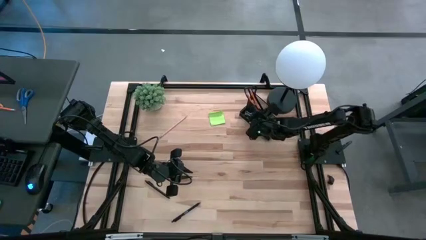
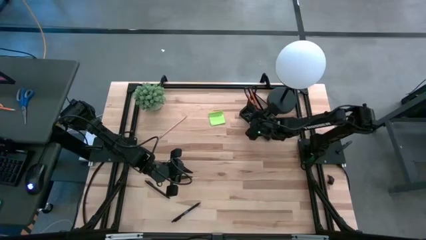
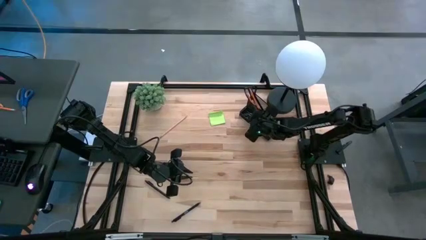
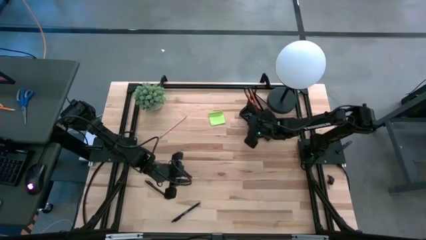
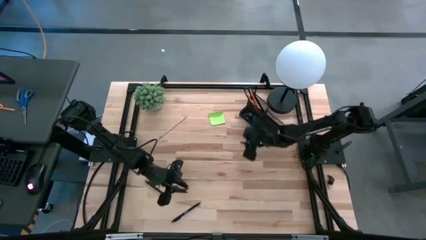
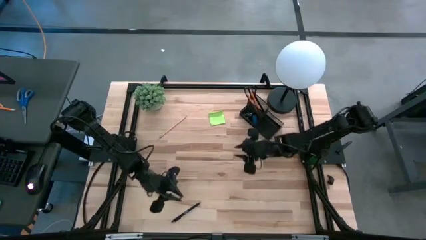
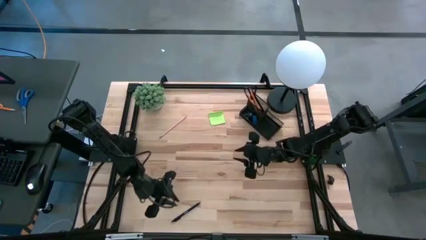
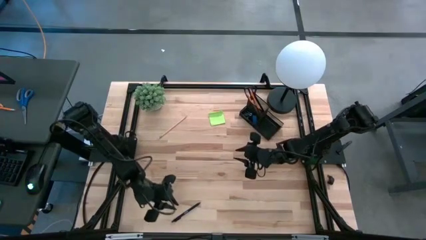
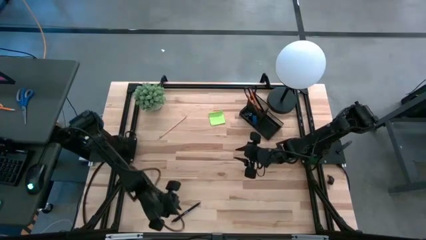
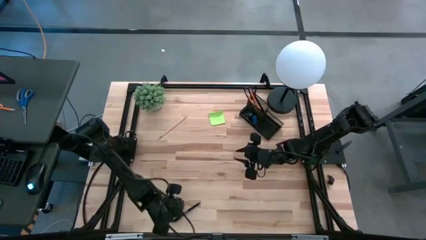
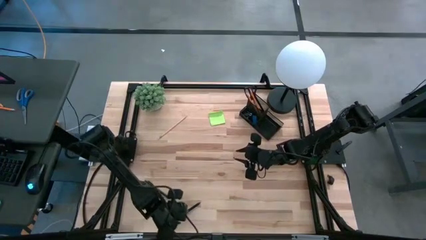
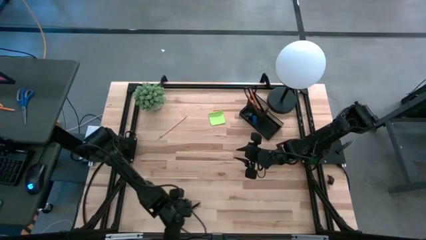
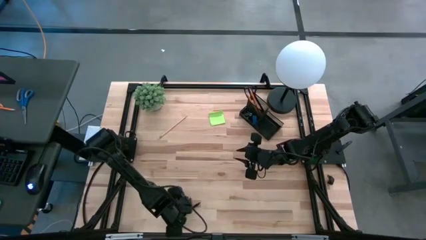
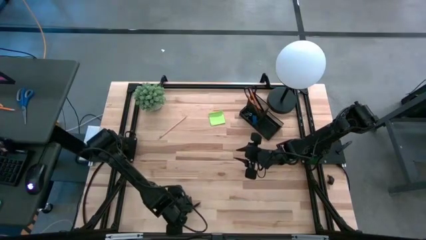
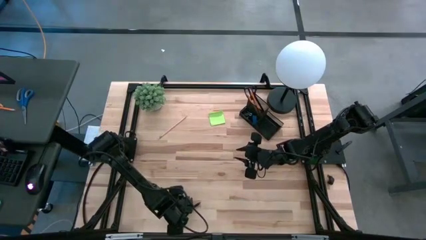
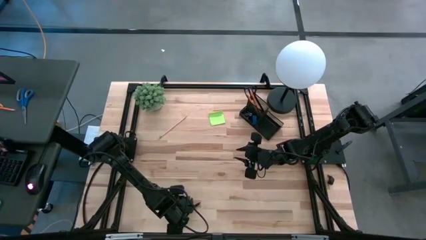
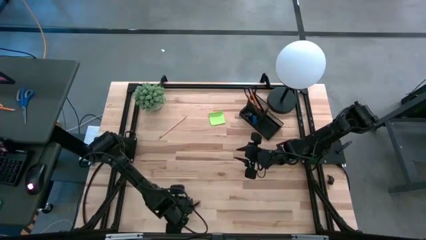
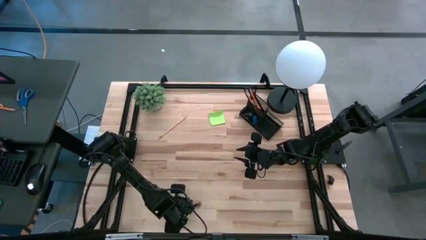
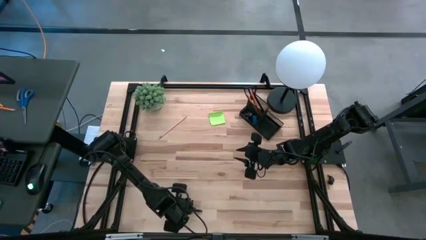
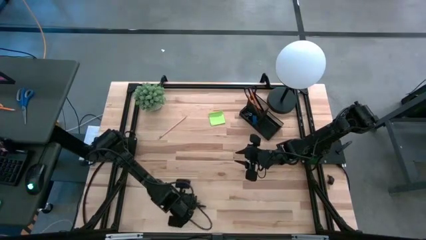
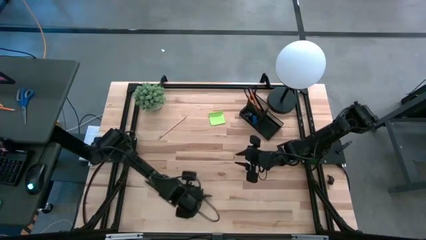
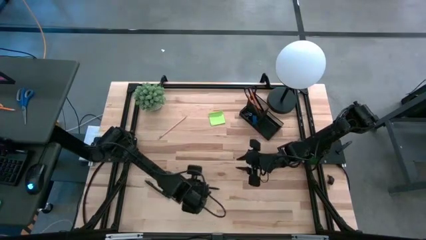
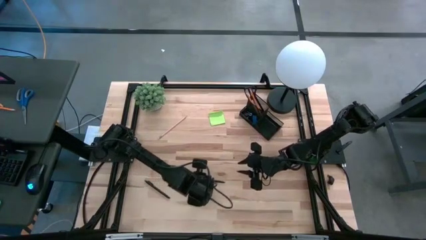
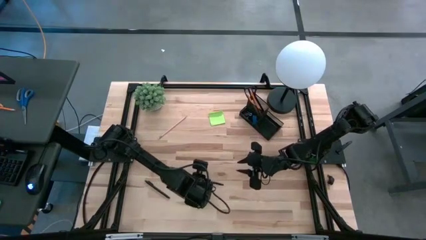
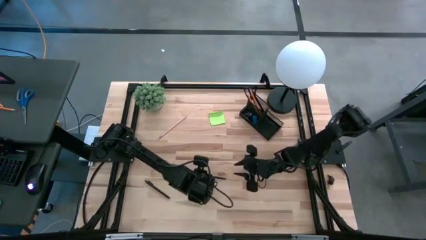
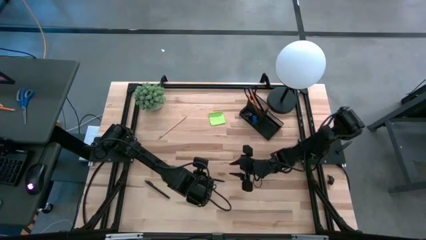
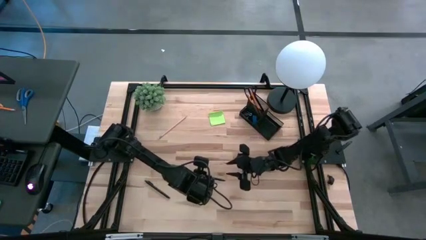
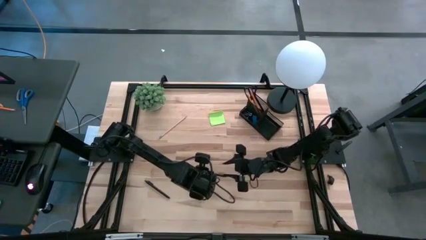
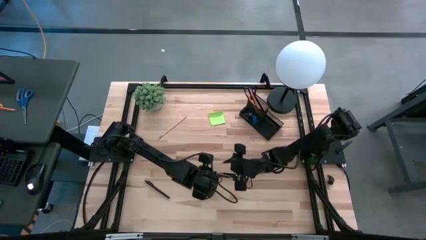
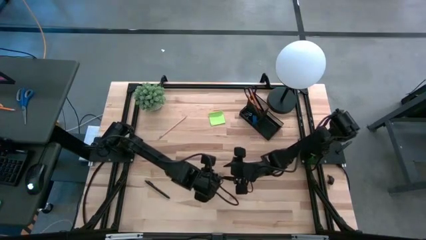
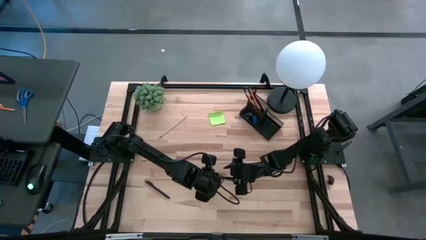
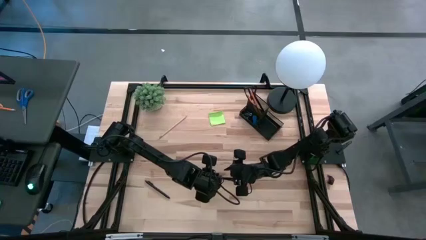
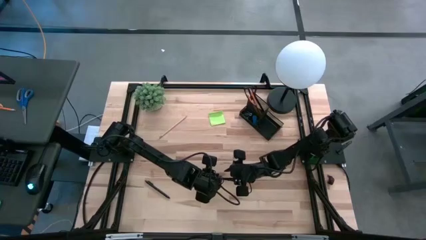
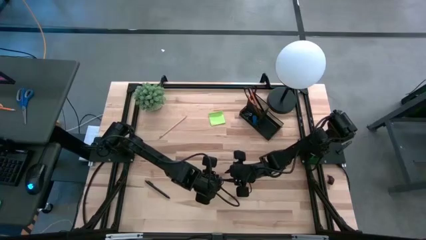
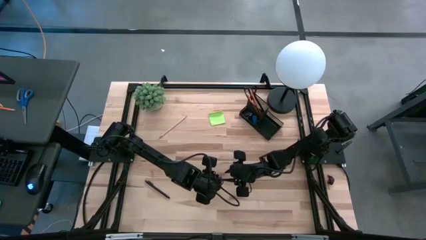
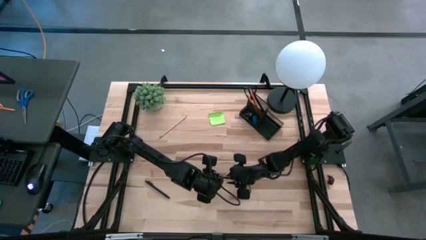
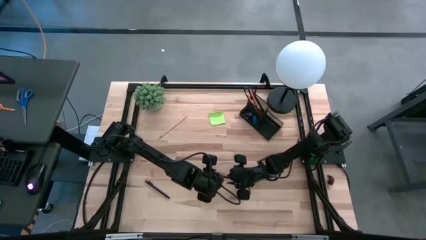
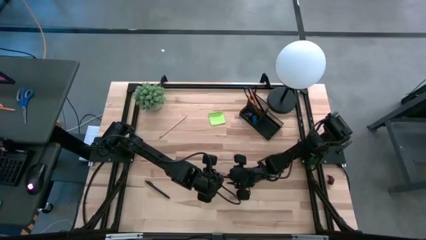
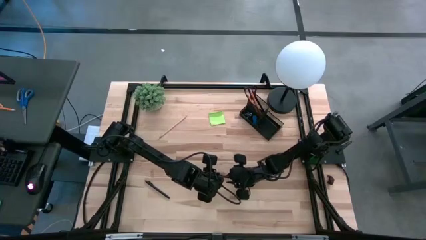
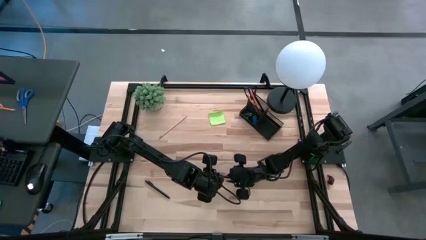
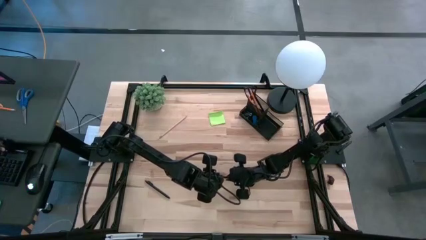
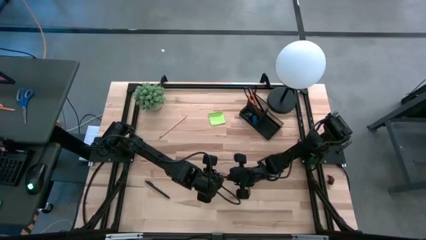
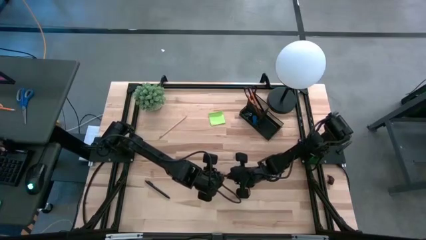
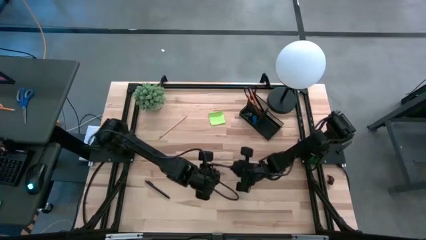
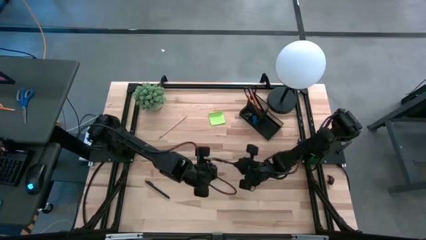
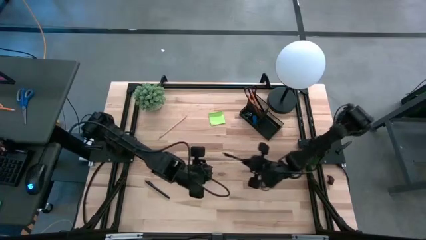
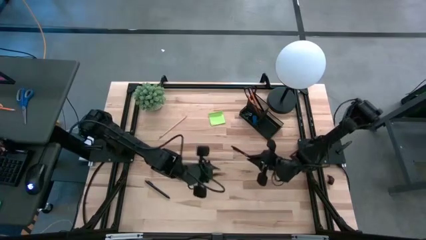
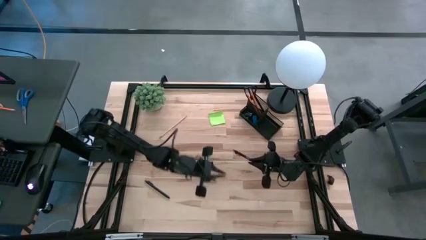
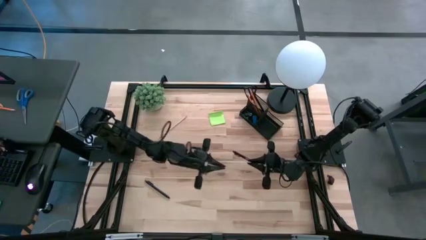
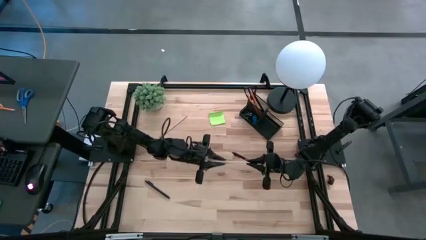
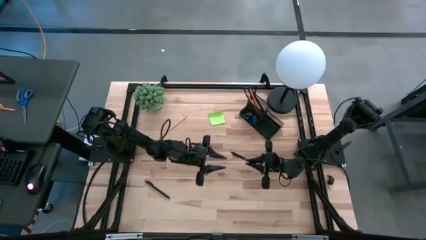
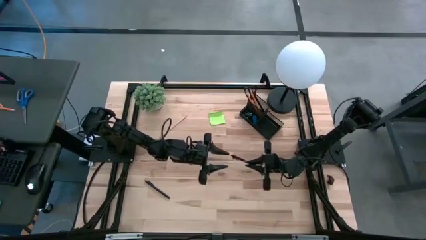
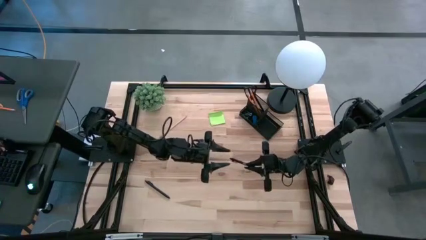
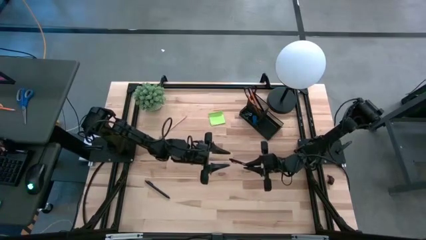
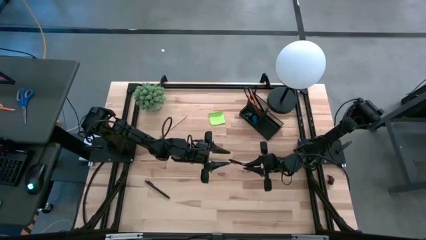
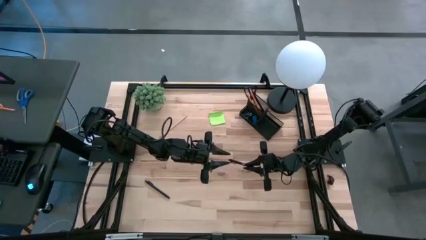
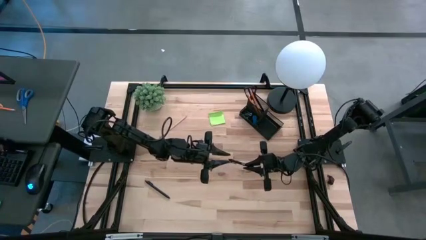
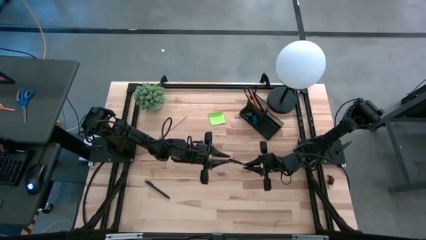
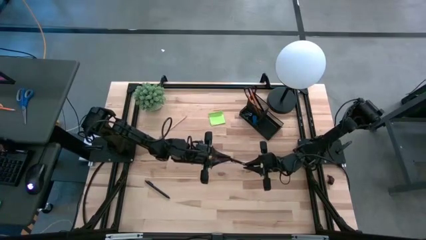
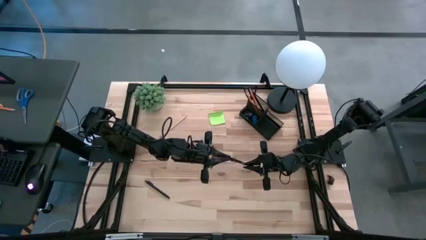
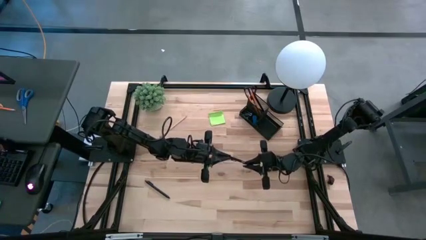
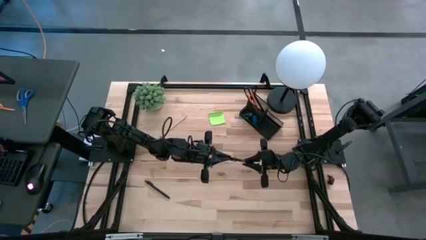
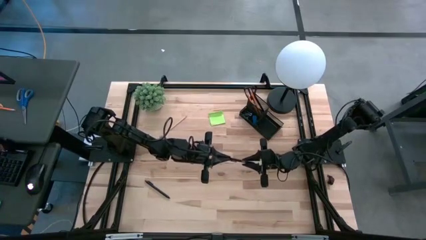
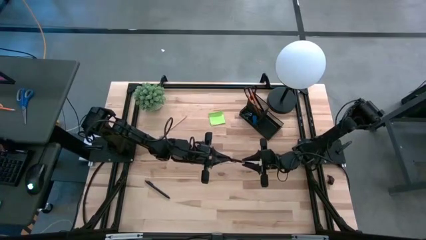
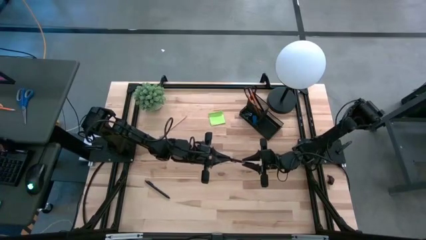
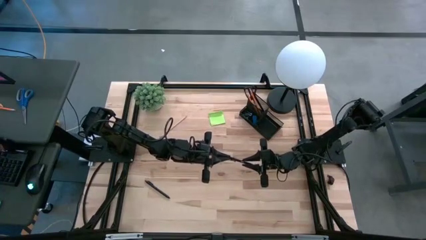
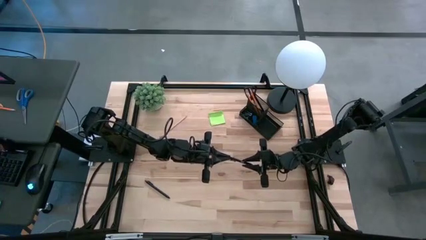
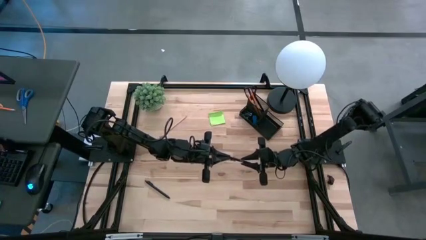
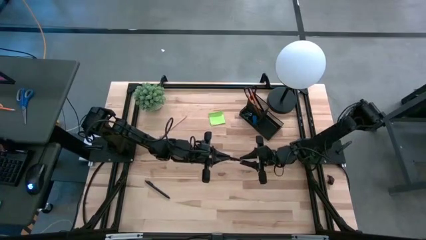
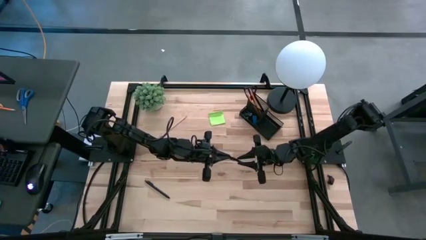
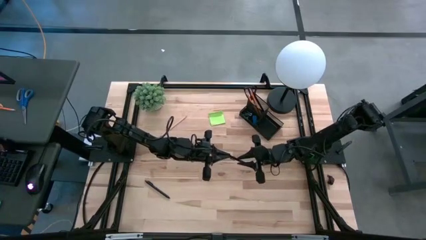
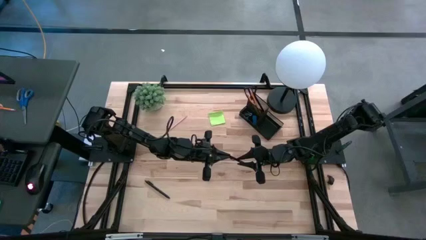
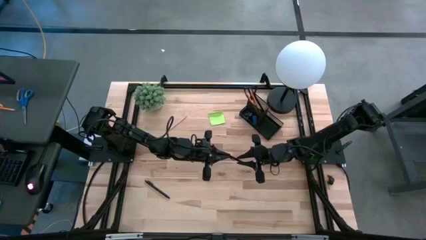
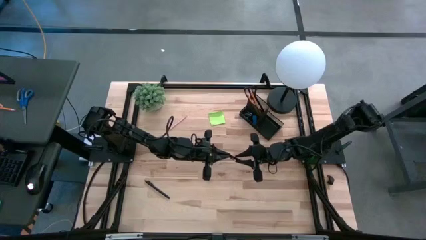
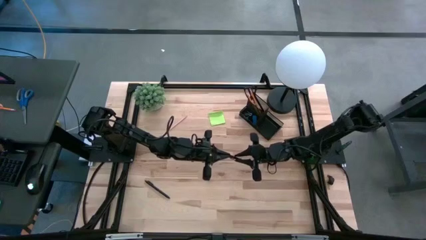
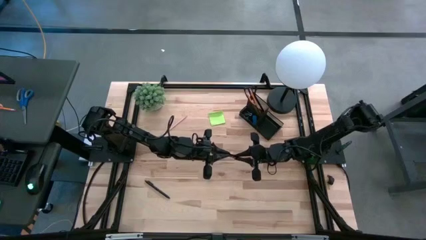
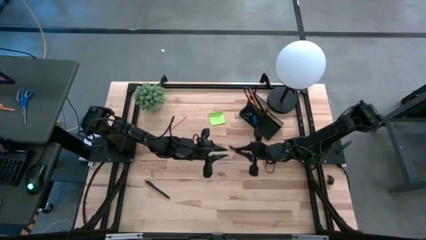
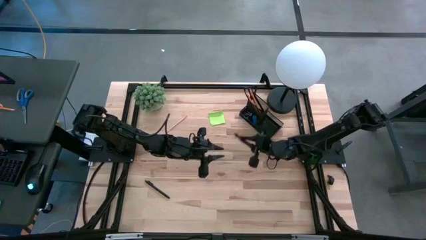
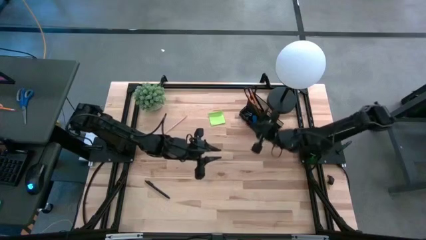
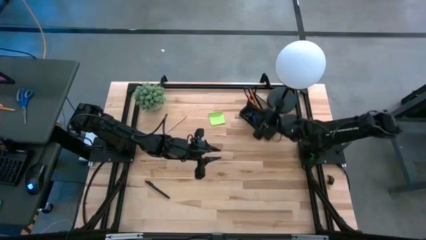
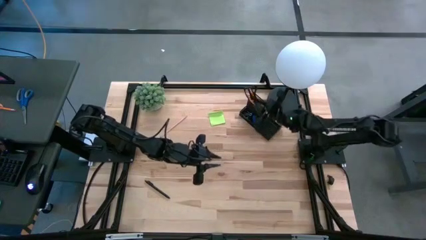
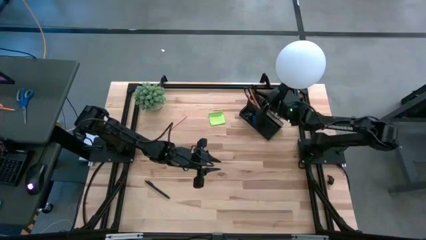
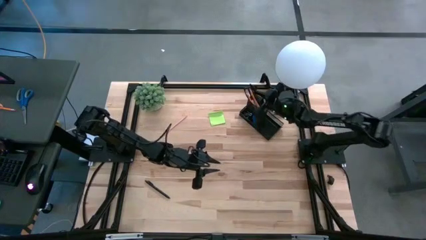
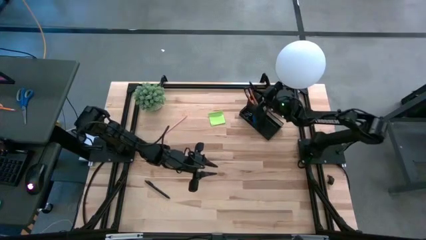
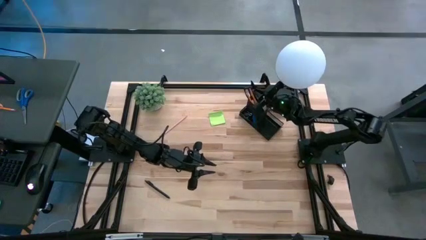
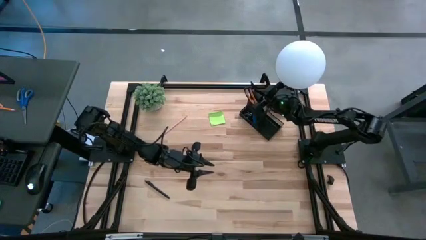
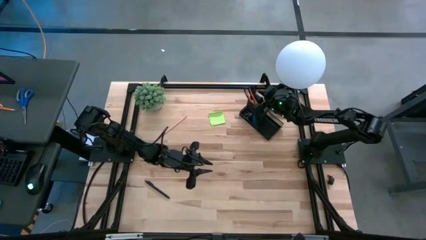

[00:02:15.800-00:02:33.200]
Task: Pick and place office supplies into organizer
Put the black pen into the black desk organizer
